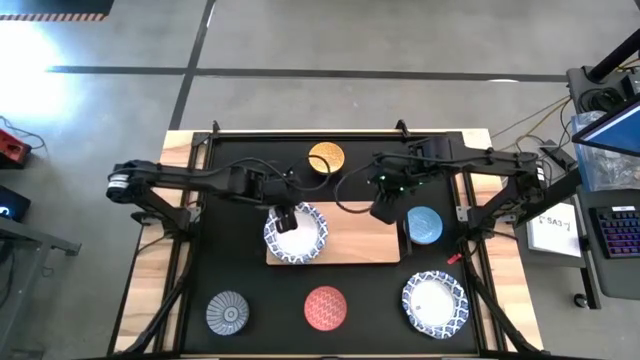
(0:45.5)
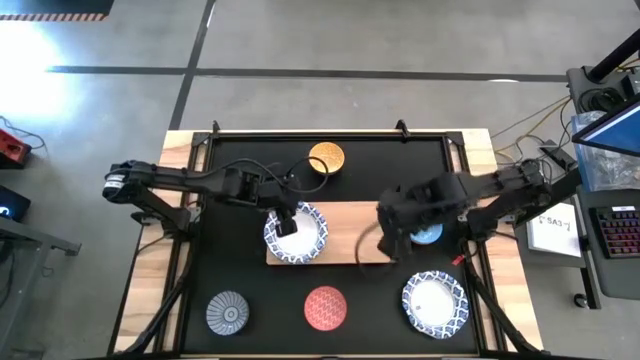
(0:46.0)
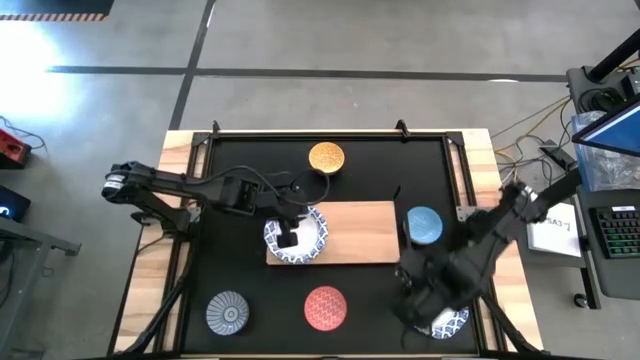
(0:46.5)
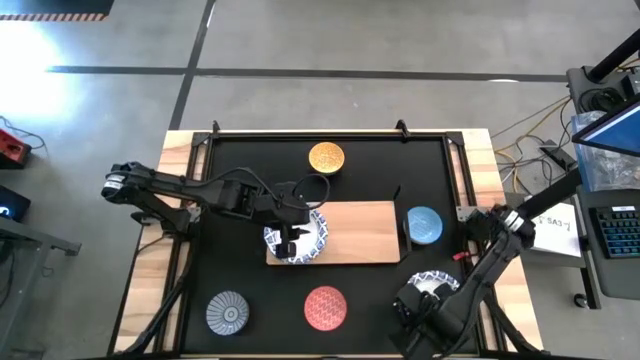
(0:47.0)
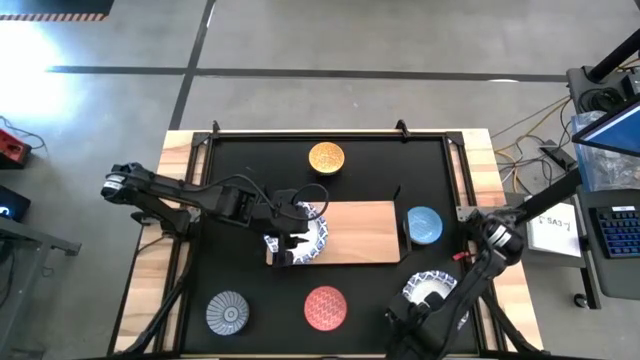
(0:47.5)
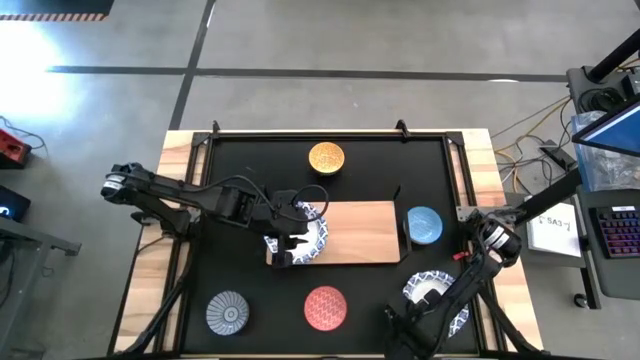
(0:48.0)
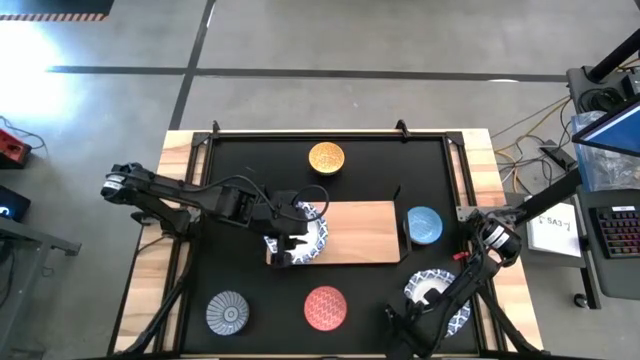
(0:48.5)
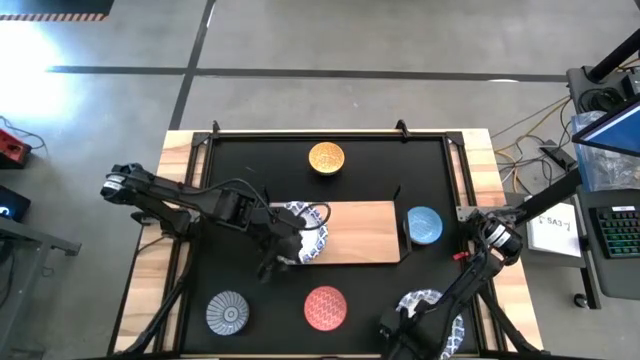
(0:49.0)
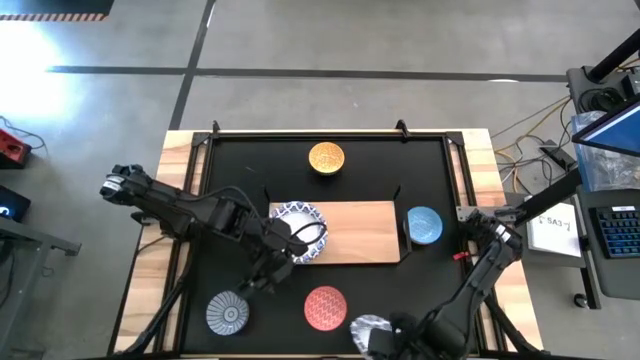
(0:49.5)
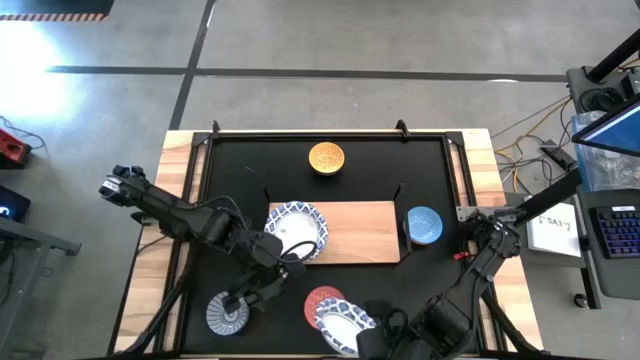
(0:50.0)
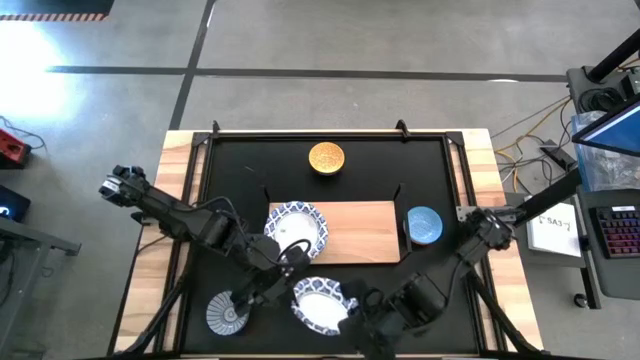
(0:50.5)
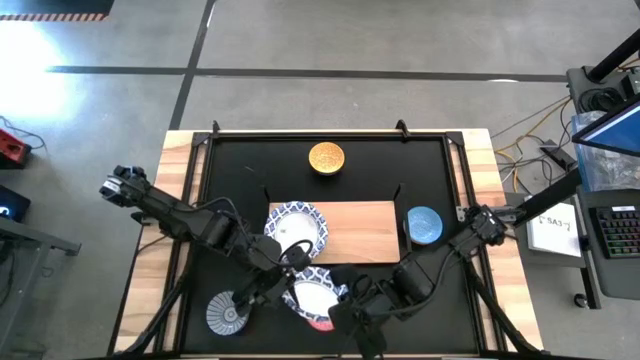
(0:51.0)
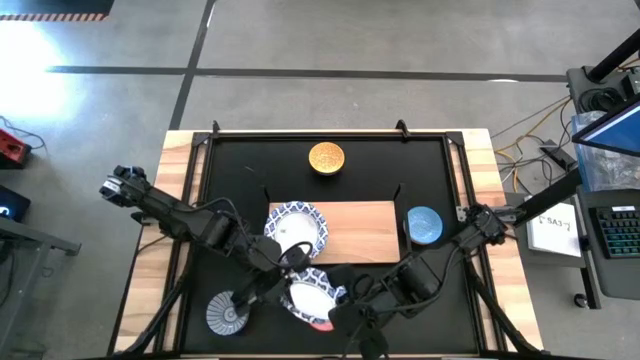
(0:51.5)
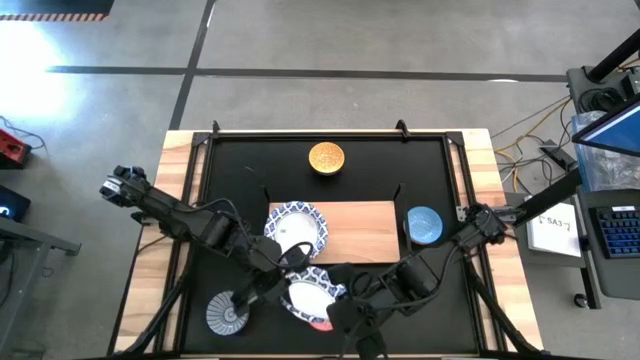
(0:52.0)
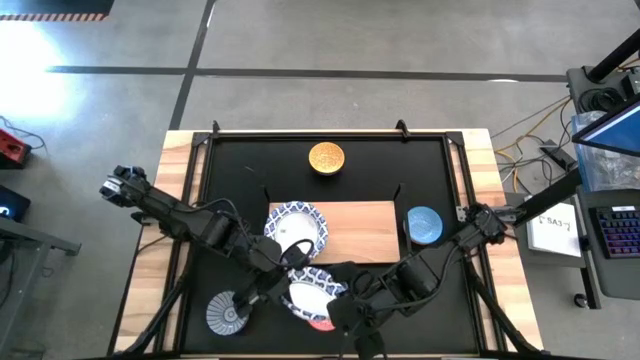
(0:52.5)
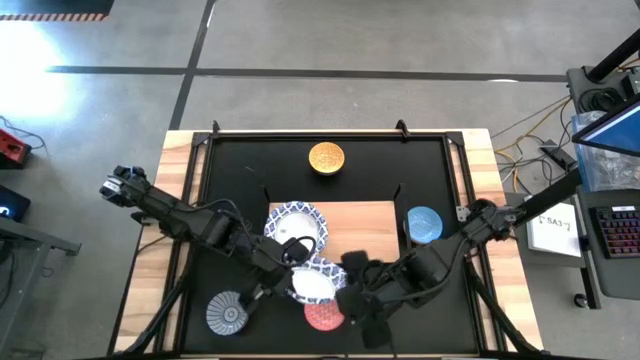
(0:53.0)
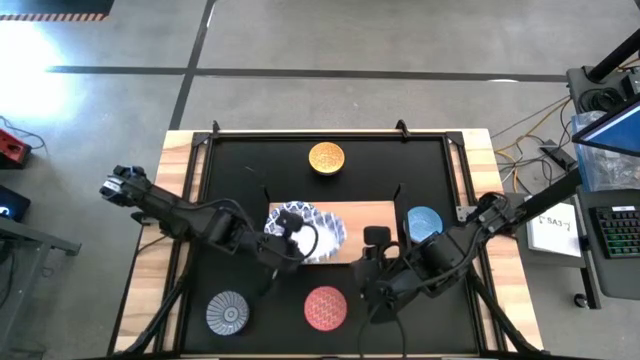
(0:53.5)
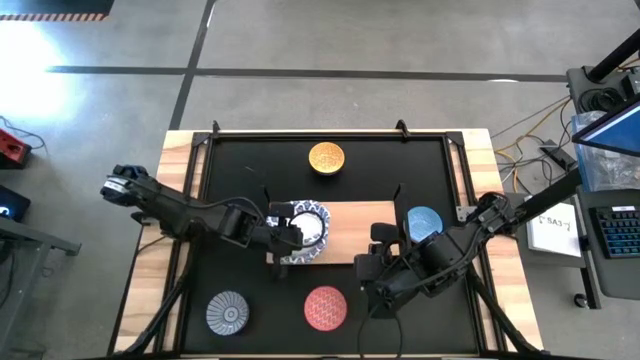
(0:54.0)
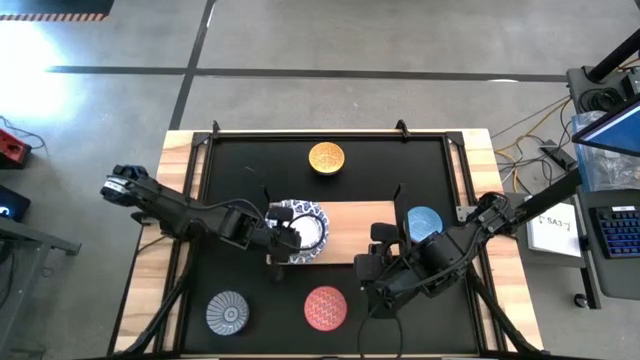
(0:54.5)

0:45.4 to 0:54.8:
Task: Place and stack bowls onto a shelf
Stack the white patterned bowl on top of the other white patterned bowls on the shelf

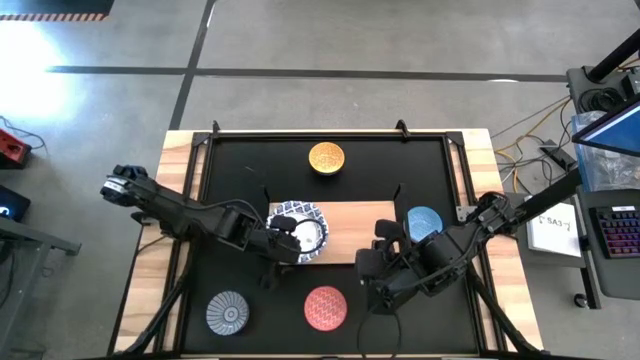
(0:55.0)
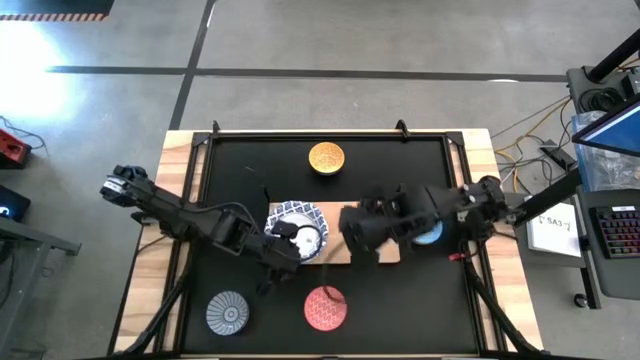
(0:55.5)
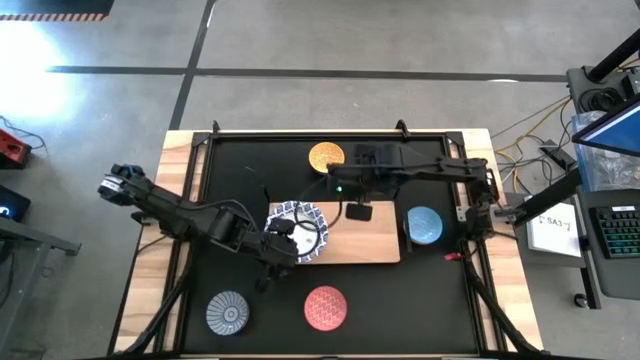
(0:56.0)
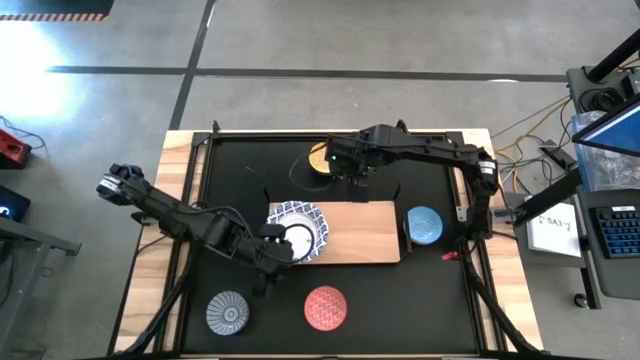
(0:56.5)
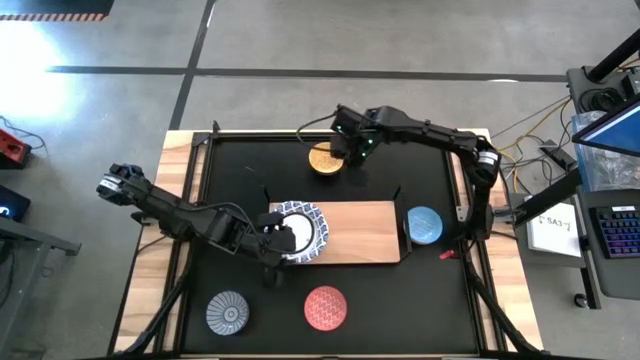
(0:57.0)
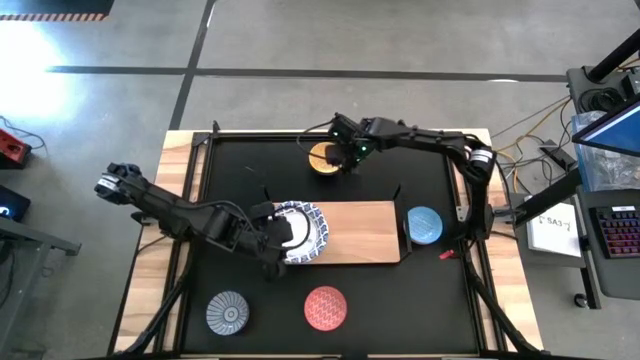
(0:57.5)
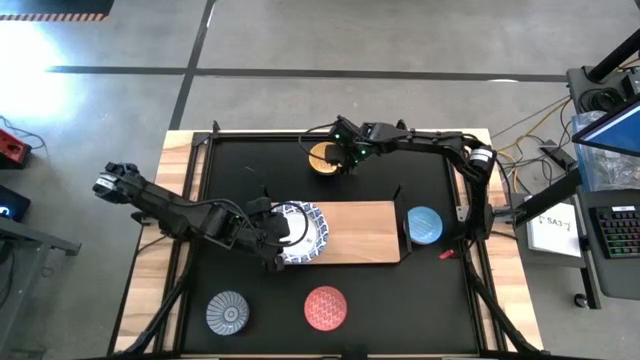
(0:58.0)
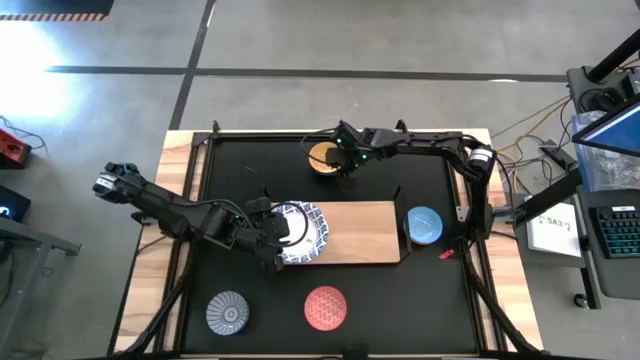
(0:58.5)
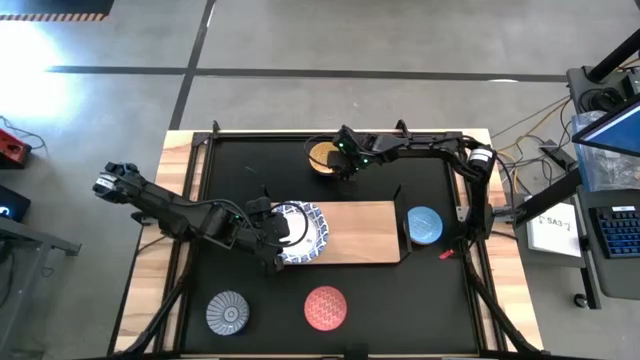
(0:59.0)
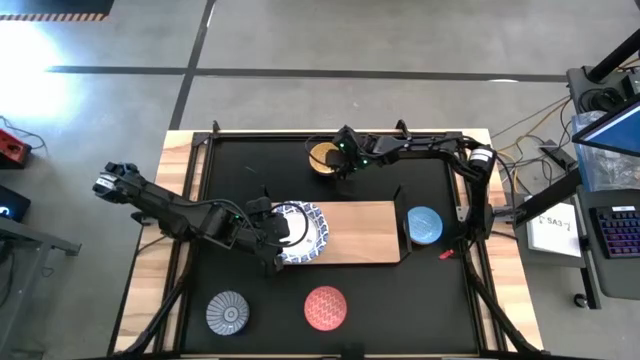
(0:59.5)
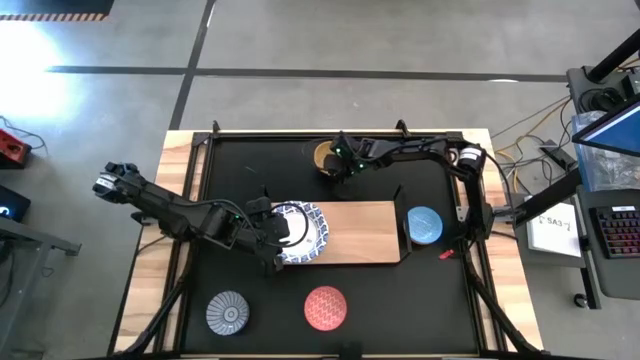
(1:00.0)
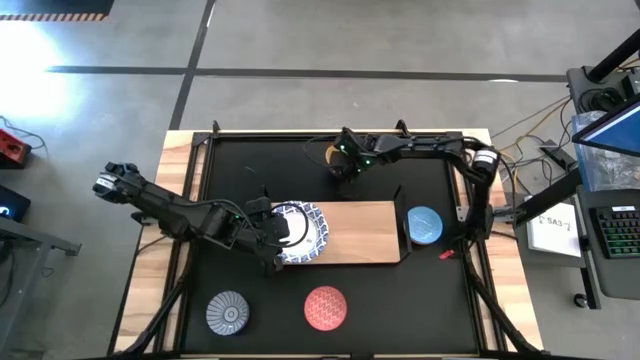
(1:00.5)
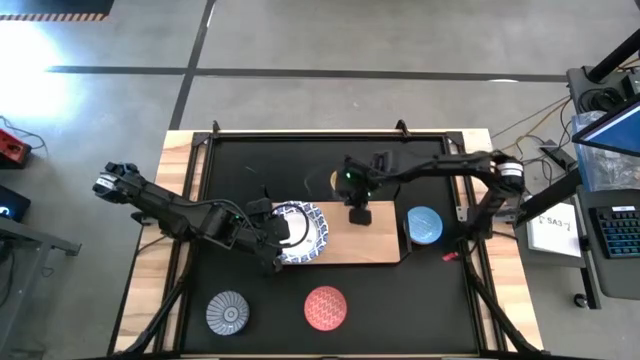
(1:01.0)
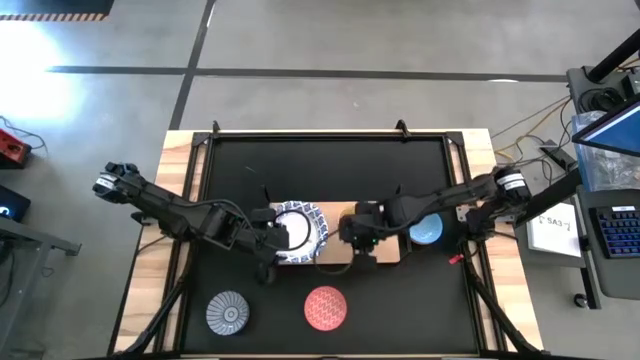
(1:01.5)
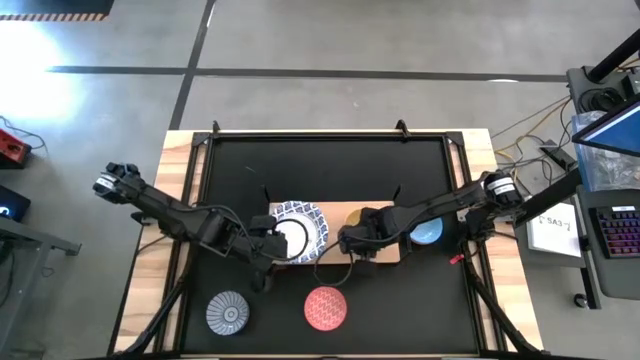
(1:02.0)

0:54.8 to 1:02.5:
Put the yellow patterned bowl on the shelf on the shelf

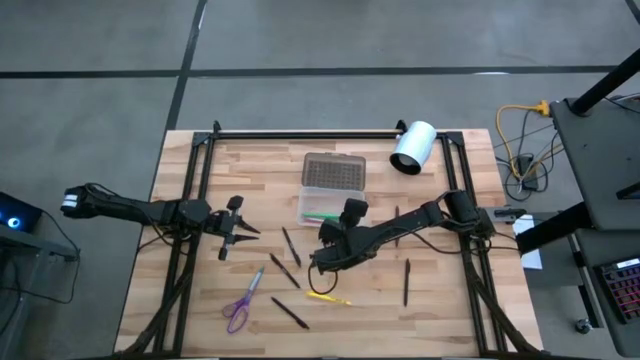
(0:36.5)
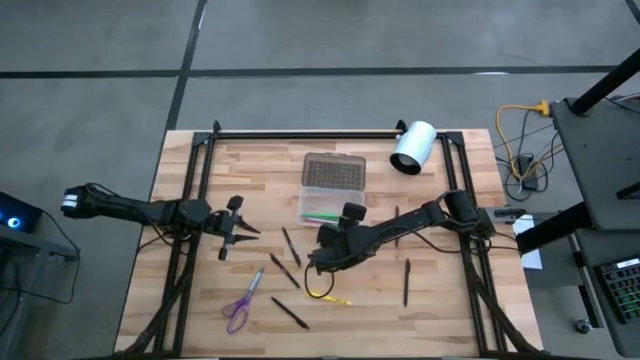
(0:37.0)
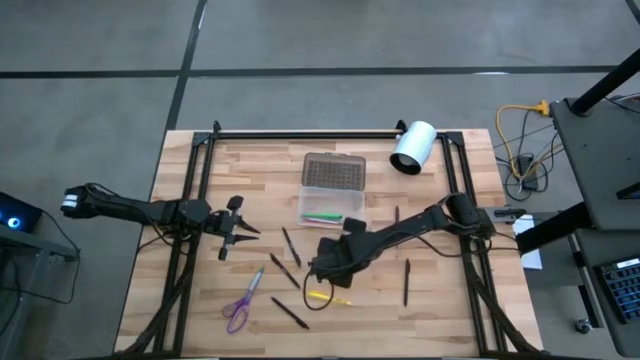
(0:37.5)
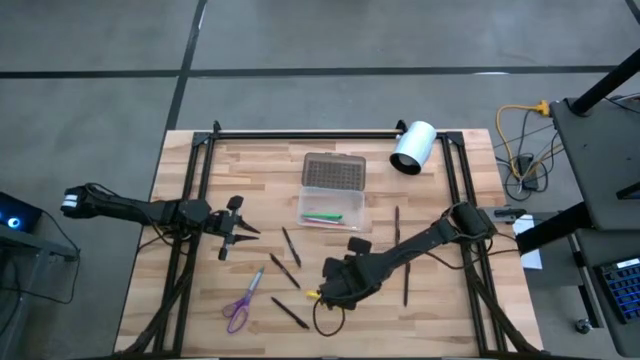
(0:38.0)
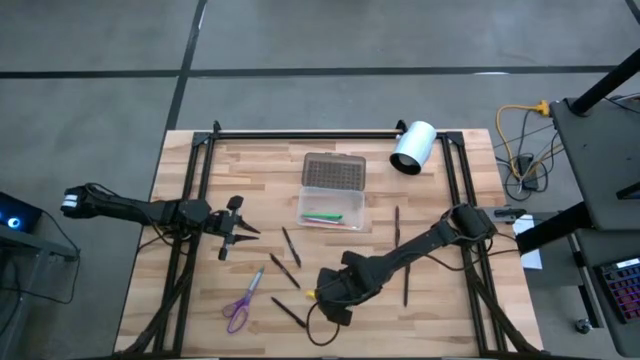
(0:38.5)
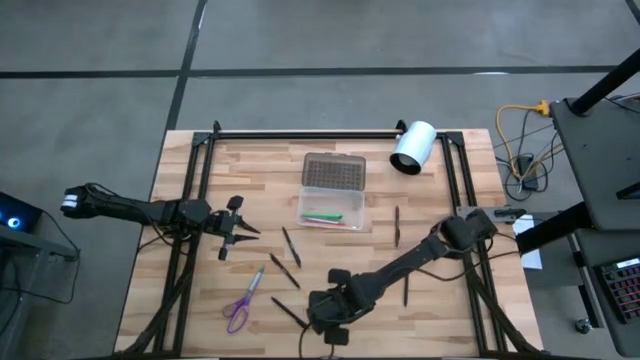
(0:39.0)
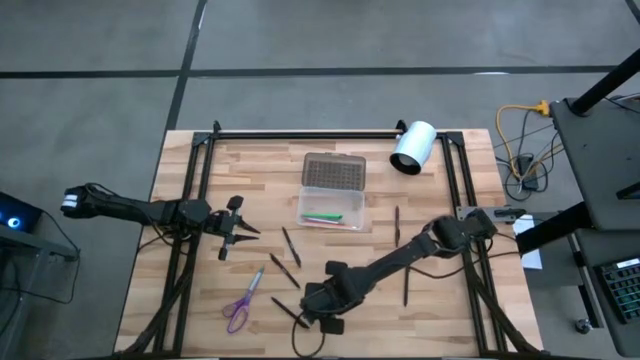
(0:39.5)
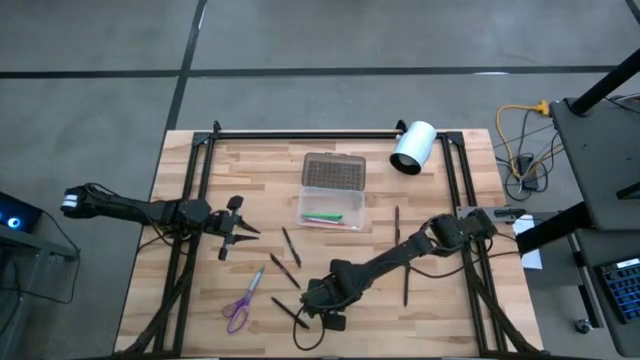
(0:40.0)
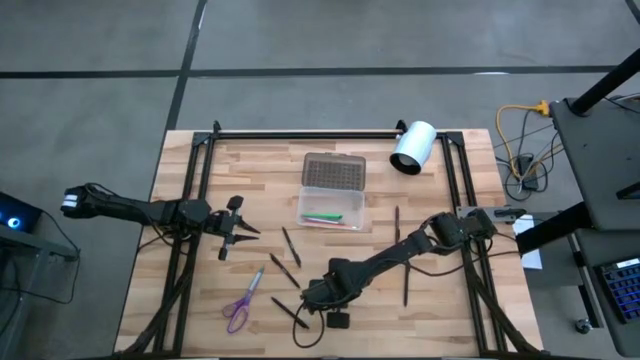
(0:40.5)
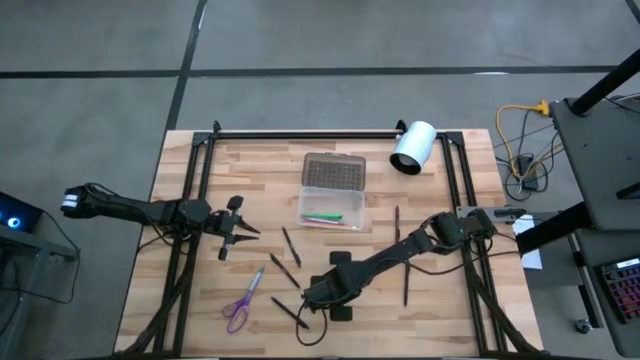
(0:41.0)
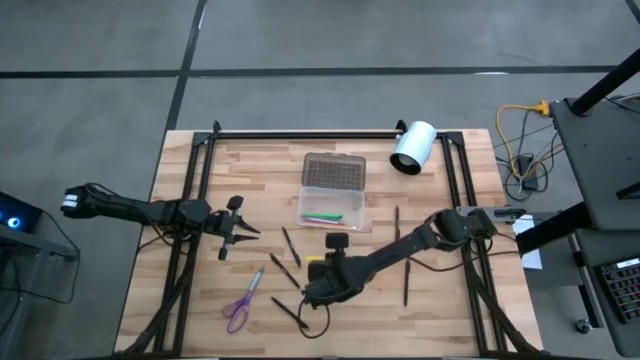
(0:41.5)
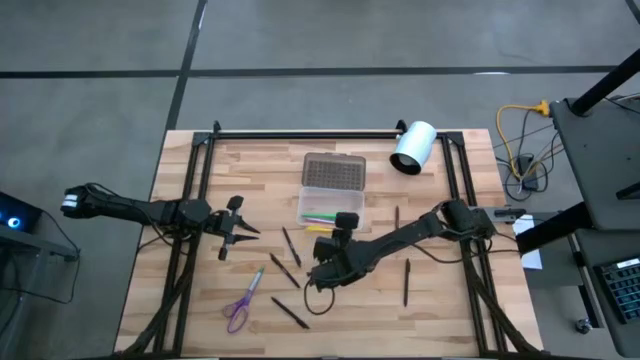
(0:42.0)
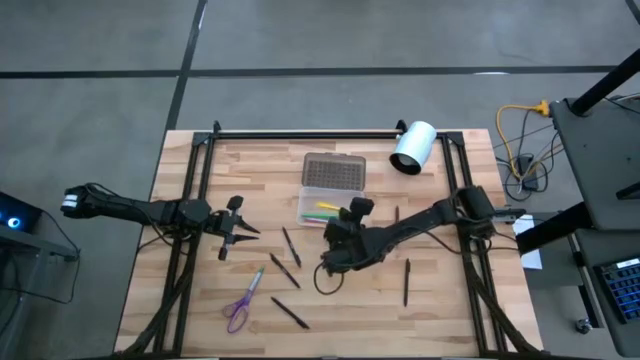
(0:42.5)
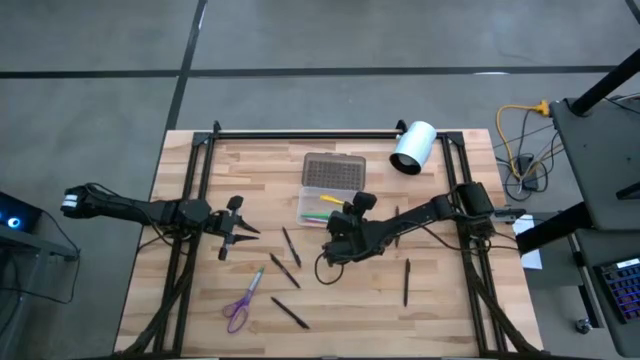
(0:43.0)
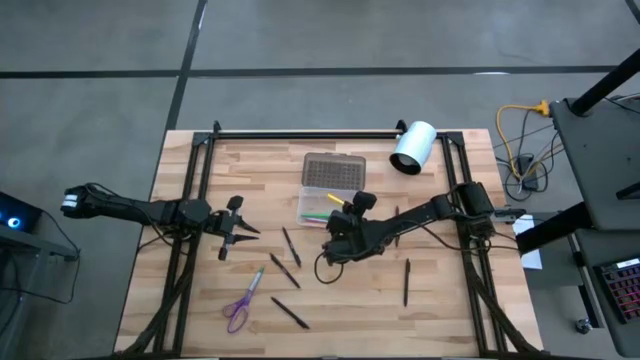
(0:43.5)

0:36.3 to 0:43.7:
Task: Pick & place school supplies into a supply box
Put the yellow pen into the black supply box
